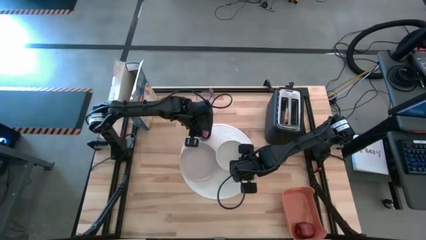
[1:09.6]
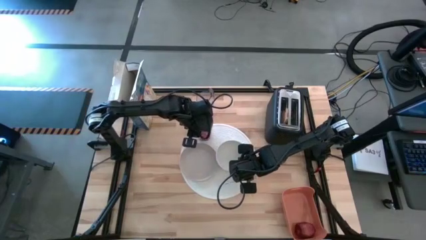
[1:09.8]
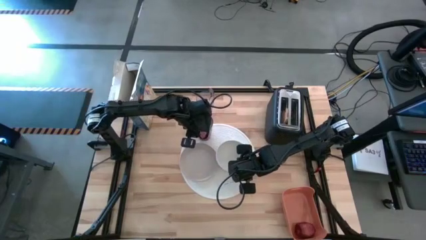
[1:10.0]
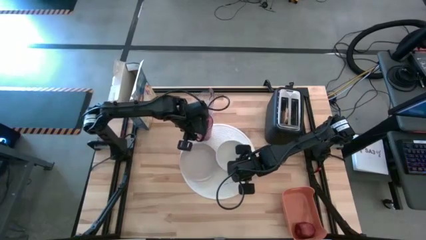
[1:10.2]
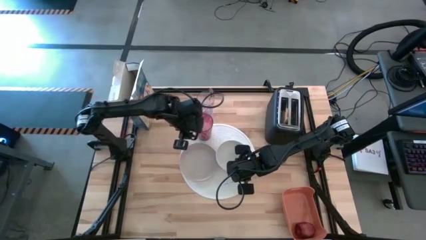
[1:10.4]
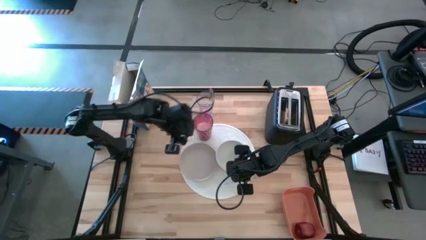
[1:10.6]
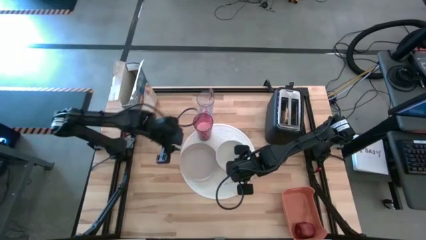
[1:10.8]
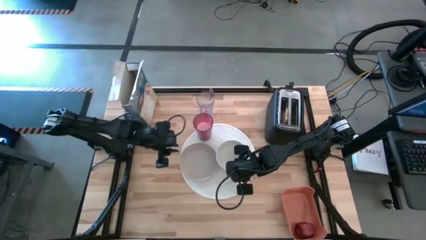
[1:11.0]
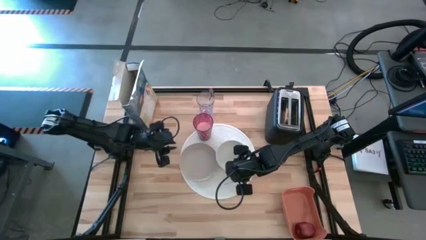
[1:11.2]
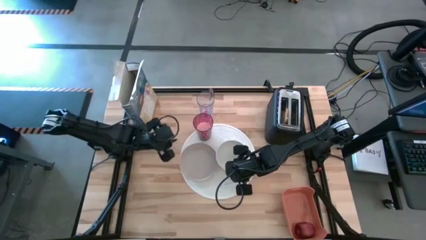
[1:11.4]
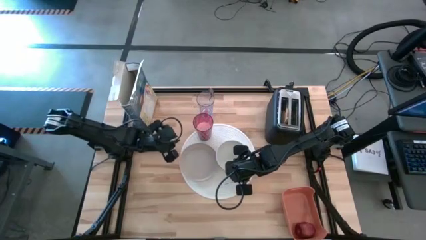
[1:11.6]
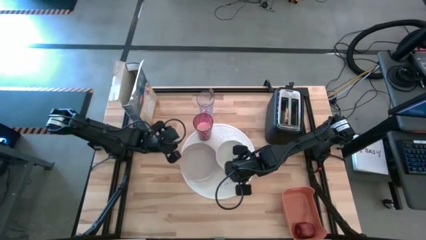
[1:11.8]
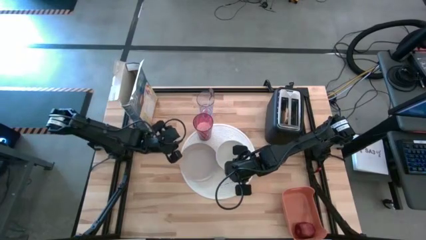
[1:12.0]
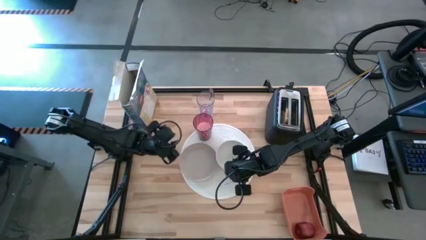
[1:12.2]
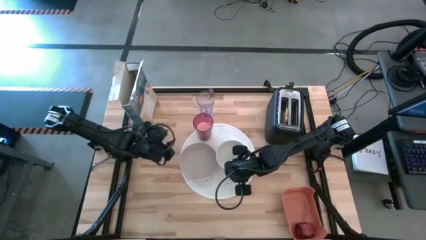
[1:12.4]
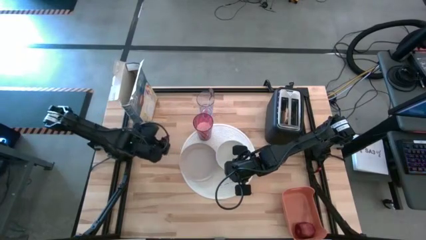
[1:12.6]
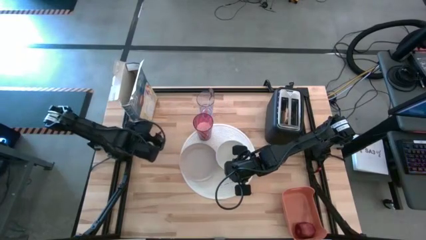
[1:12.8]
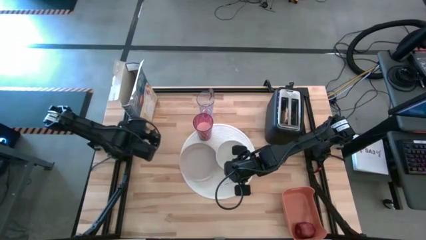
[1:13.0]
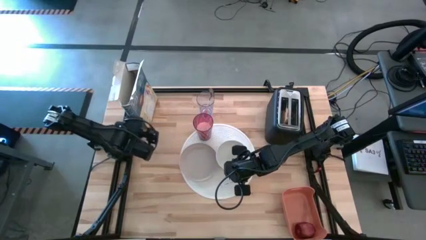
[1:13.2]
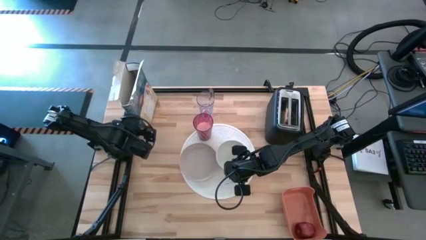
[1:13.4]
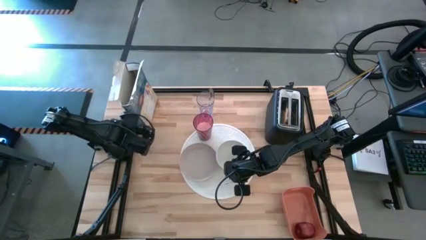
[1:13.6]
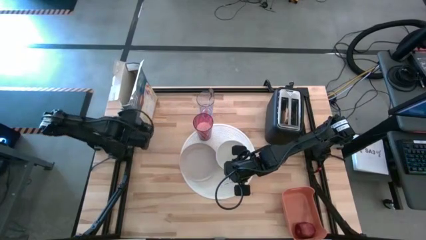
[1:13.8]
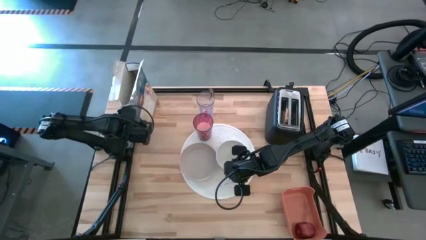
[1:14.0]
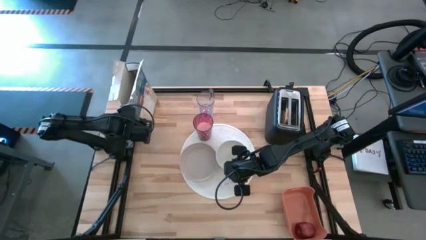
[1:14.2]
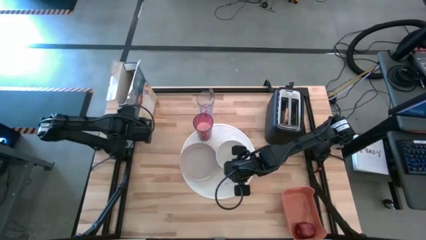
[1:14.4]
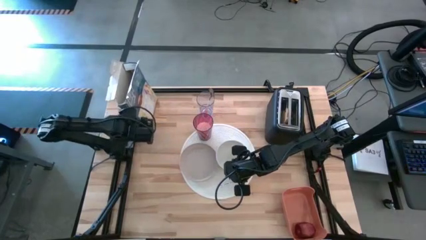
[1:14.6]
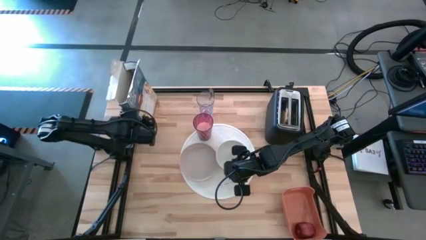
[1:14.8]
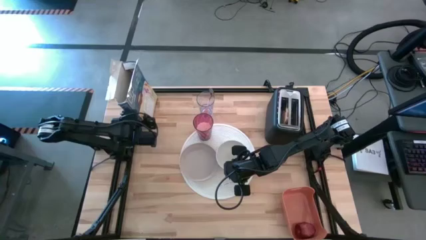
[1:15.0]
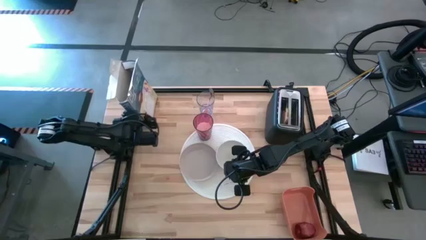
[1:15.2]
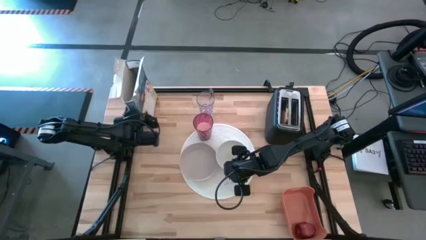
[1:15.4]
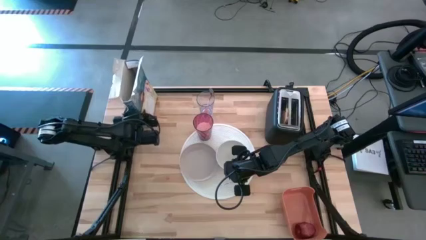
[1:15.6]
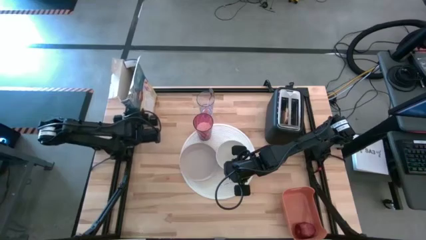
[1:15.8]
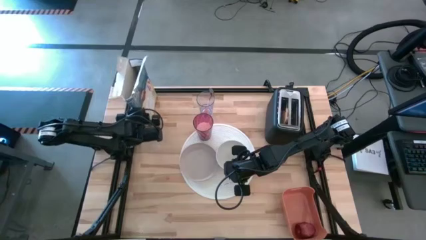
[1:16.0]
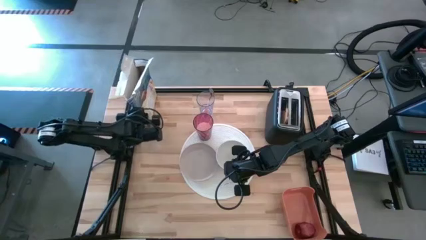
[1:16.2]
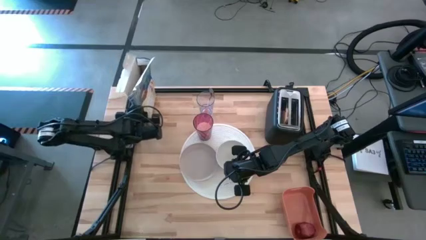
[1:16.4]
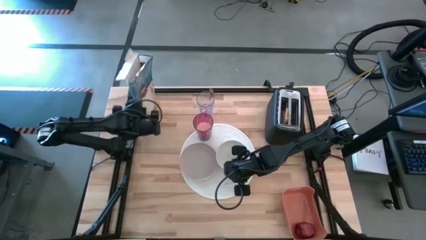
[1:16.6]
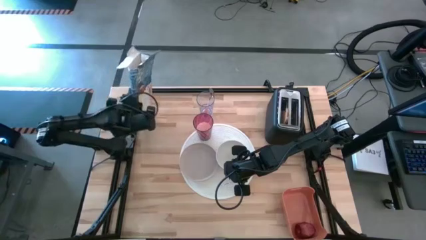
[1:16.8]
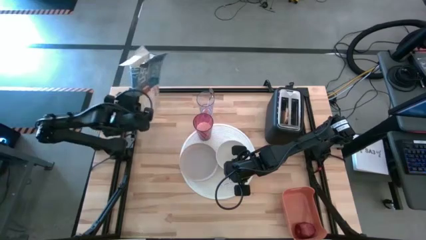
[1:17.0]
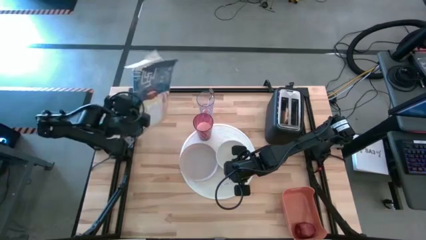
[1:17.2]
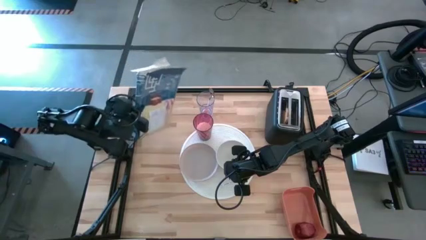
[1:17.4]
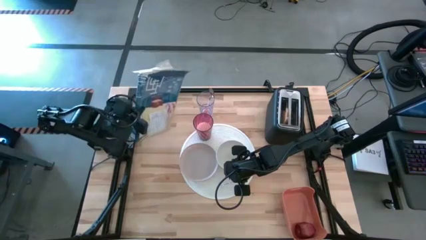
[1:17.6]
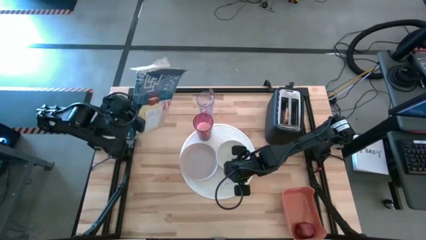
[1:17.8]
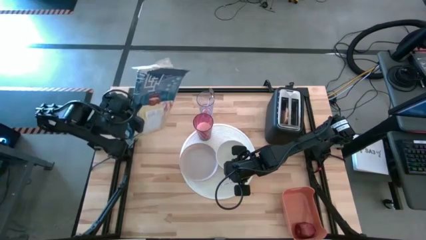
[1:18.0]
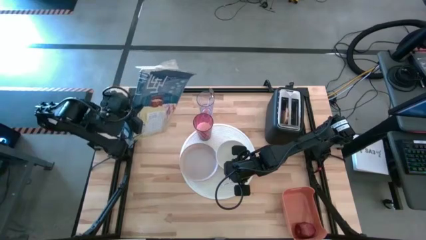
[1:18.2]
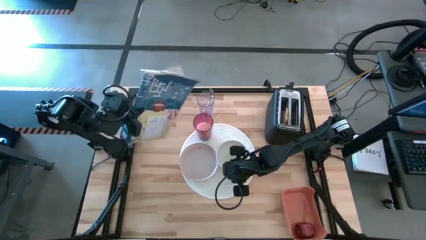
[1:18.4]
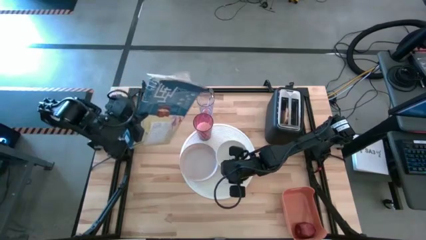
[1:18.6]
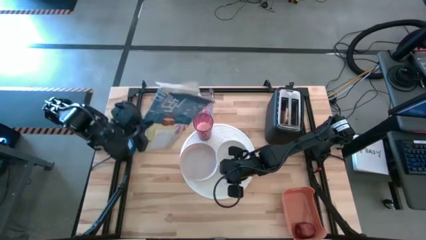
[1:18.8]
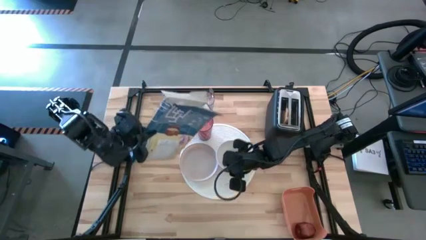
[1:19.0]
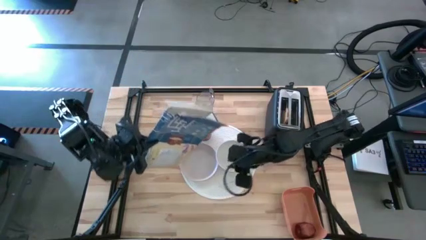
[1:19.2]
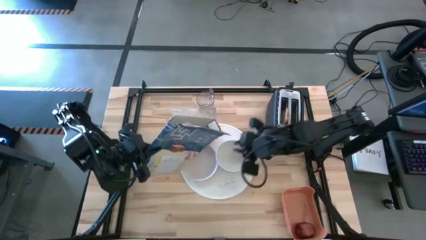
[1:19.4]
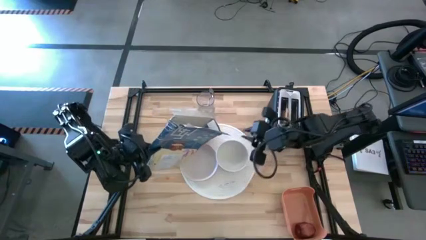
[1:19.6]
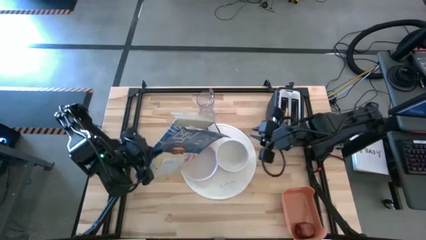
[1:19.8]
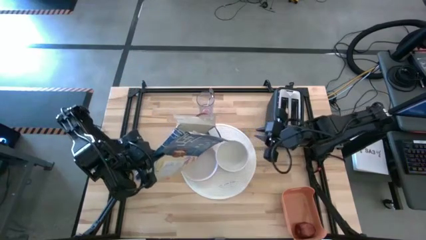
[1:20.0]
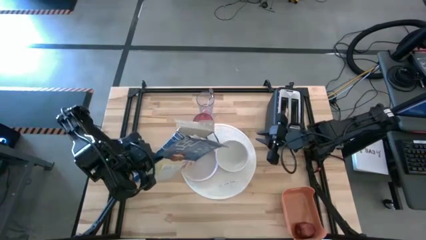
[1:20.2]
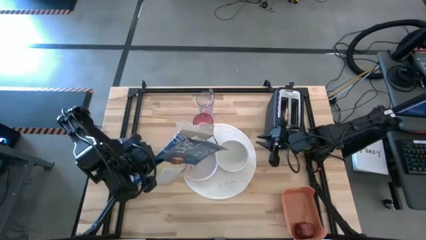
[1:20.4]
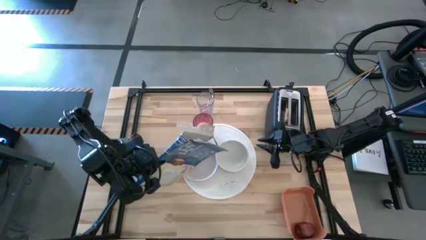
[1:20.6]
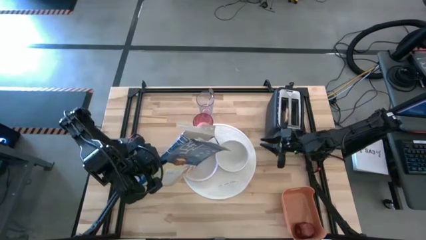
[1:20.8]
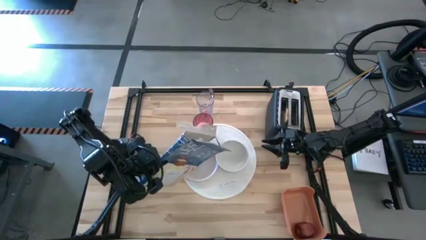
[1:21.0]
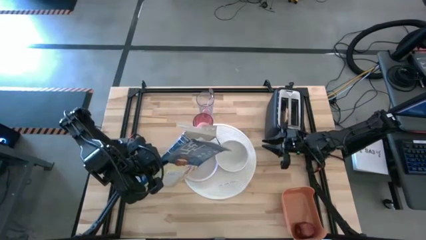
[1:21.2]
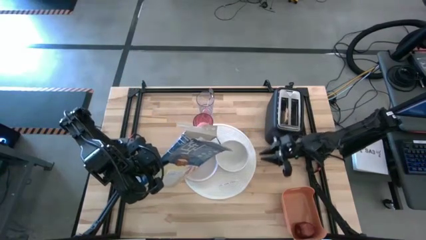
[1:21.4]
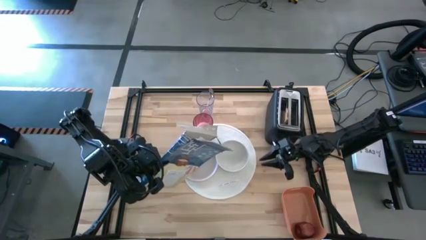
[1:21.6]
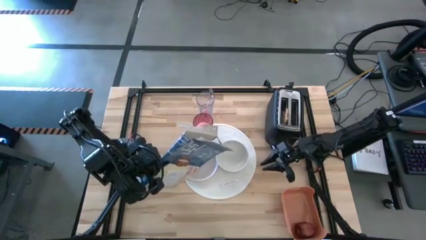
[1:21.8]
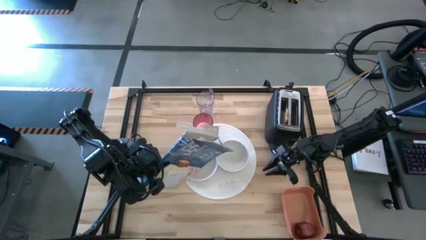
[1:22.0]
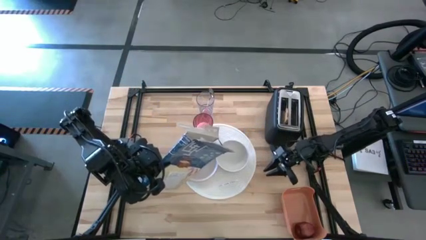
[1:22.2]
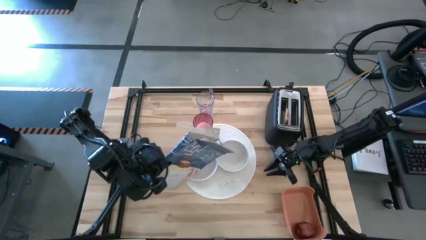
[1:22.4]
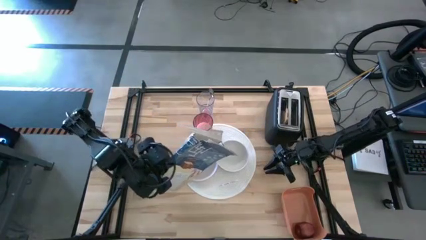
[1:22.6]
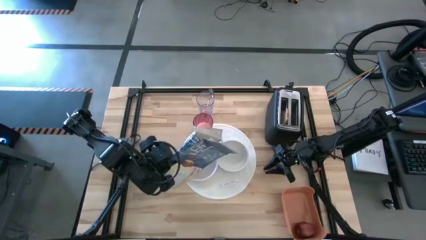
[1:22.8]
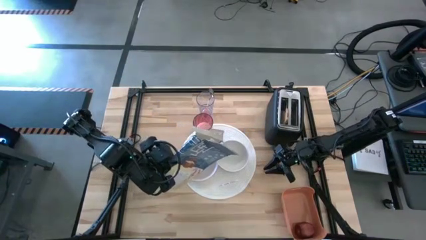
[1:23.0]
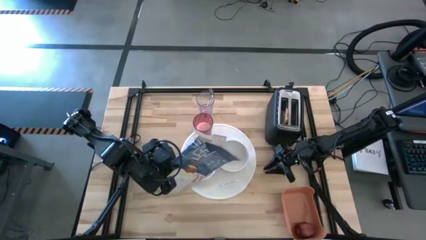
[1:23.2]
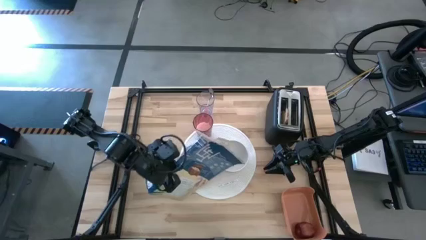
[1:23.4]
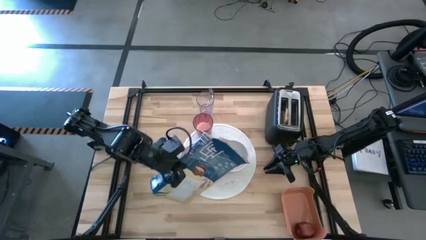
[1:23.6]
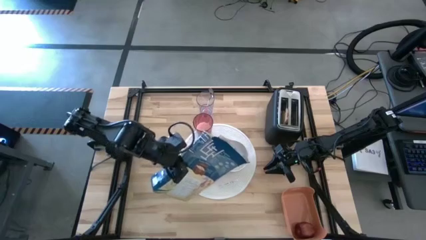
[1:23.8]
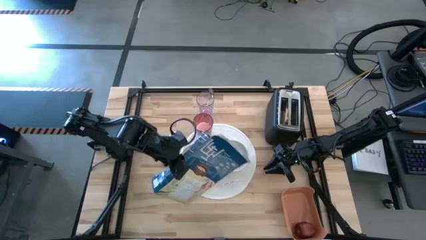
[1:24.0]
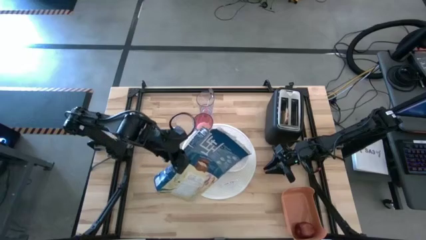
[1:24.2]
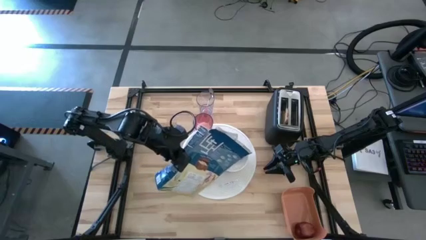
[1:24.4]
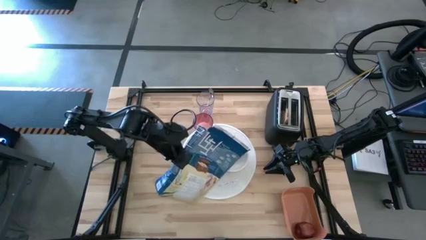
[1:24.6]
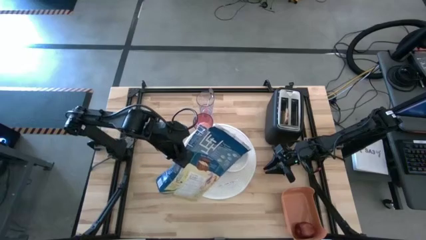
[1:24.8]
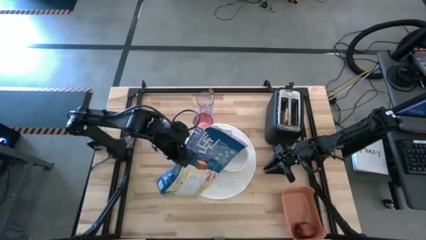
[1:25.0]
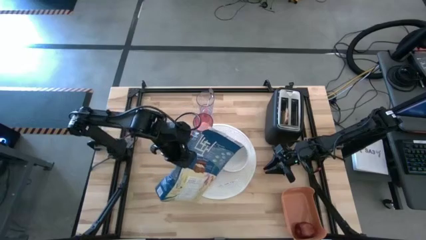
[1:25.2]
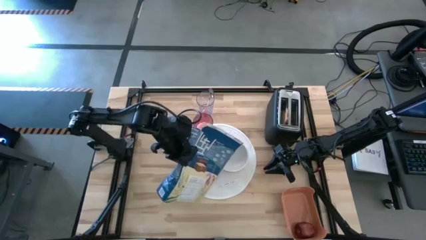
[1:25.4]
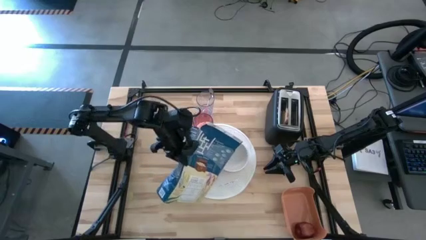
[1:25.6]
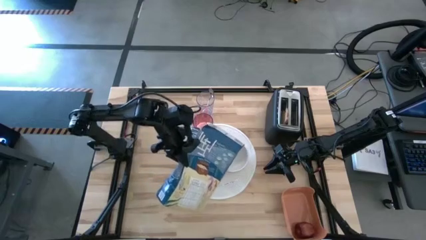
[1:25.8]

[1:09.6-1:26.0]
Task: Arrange a breakfast setting
Pour the cereal from the cereal box into the white bowl
